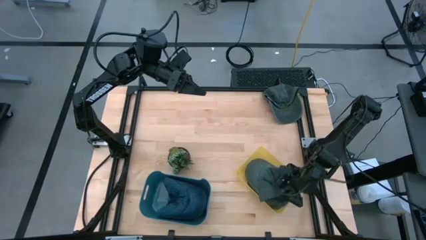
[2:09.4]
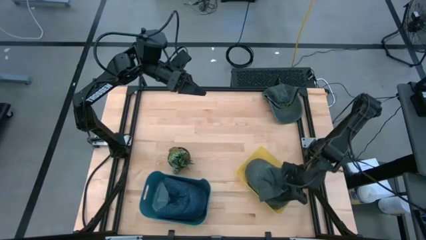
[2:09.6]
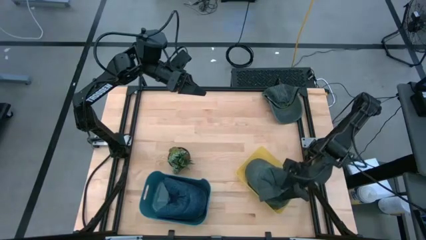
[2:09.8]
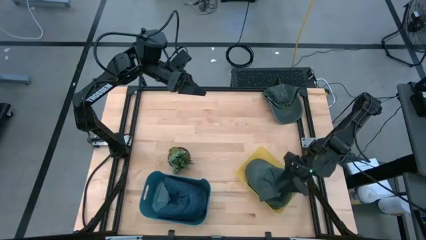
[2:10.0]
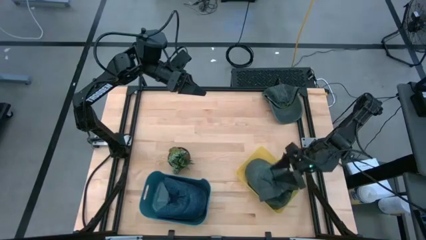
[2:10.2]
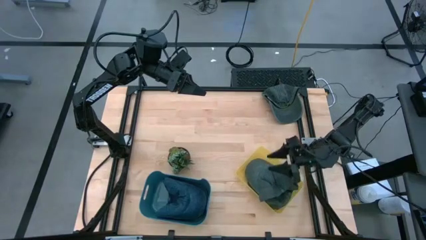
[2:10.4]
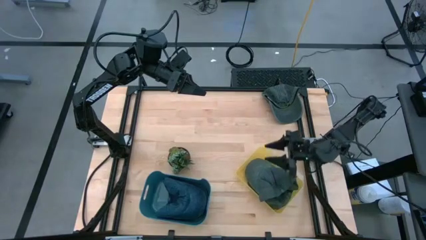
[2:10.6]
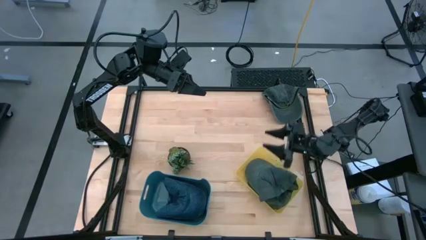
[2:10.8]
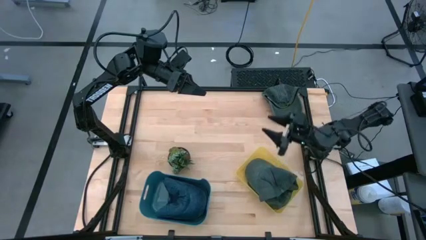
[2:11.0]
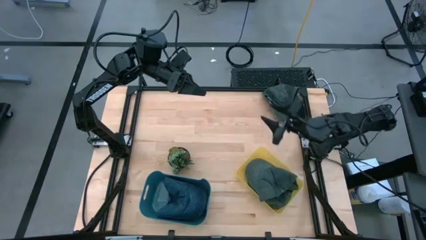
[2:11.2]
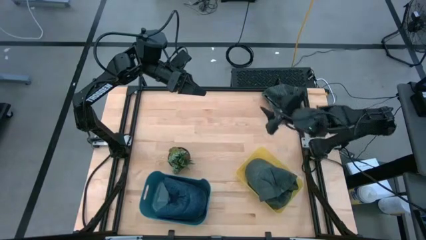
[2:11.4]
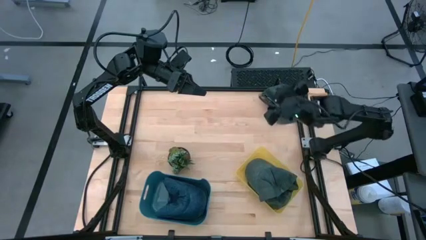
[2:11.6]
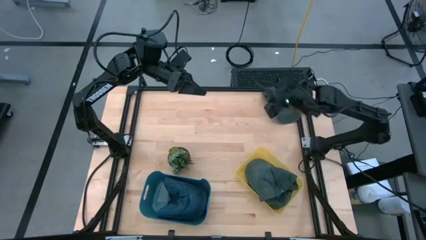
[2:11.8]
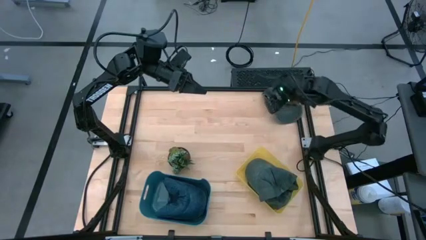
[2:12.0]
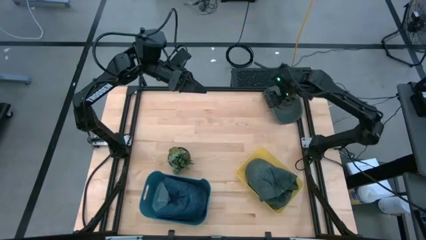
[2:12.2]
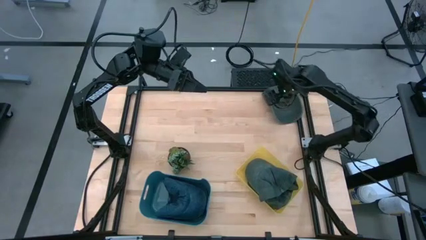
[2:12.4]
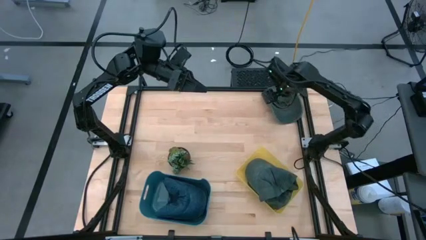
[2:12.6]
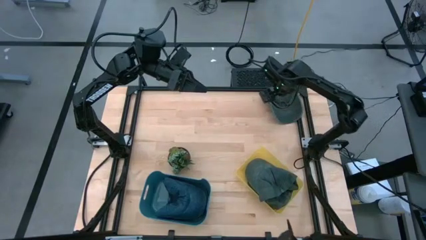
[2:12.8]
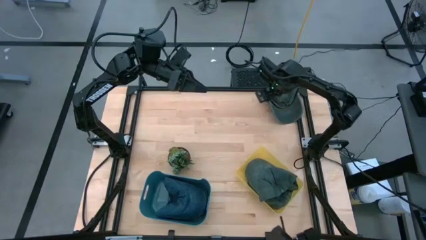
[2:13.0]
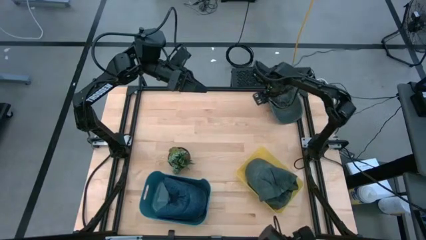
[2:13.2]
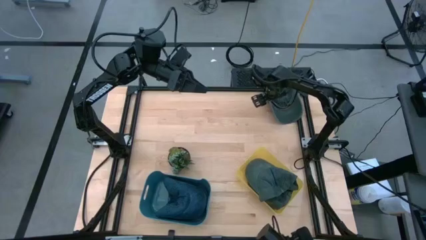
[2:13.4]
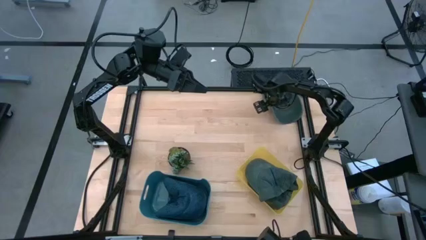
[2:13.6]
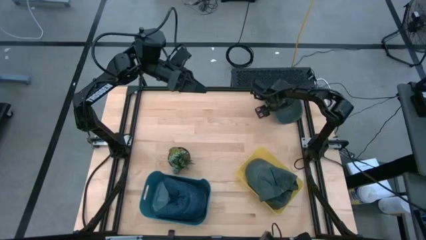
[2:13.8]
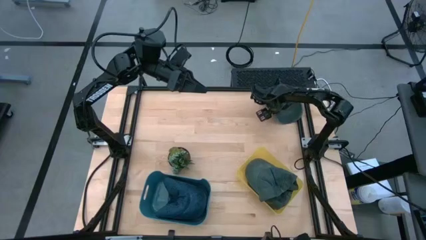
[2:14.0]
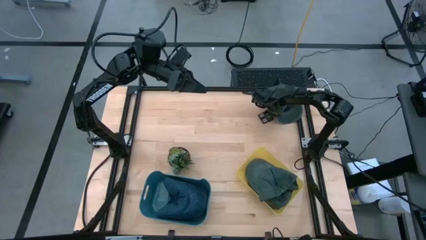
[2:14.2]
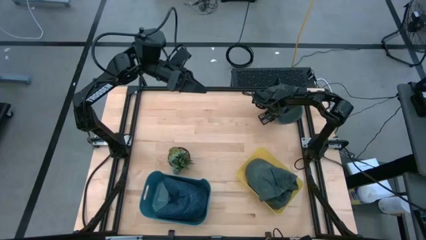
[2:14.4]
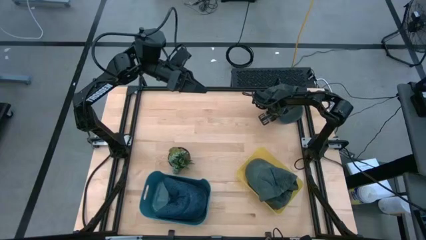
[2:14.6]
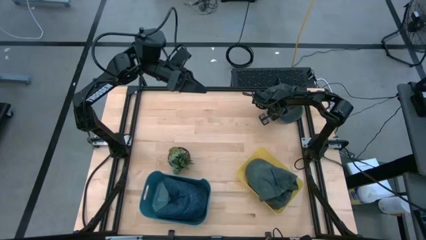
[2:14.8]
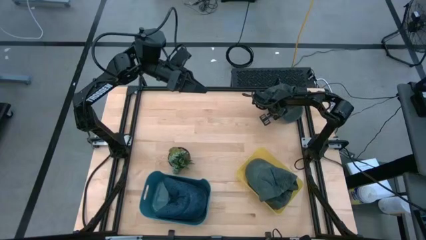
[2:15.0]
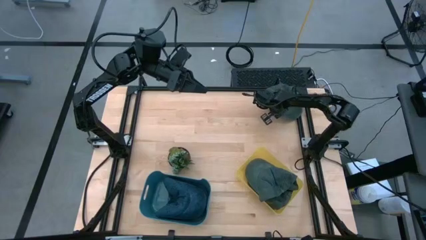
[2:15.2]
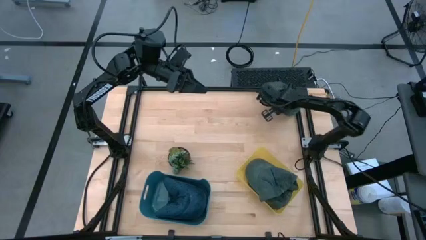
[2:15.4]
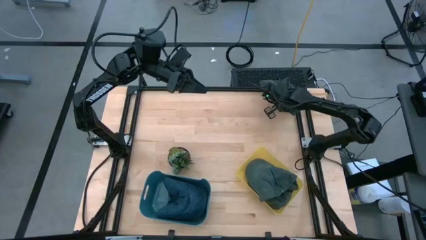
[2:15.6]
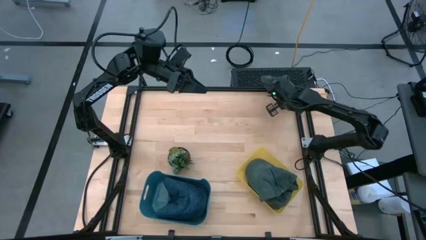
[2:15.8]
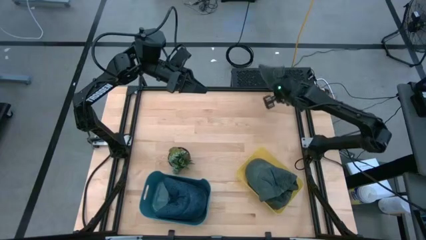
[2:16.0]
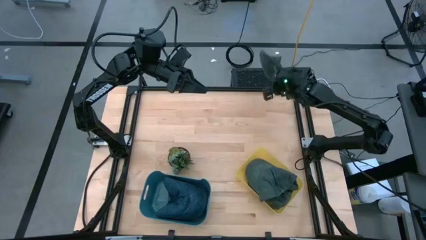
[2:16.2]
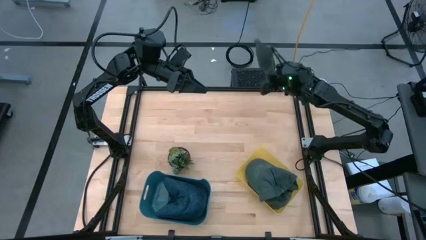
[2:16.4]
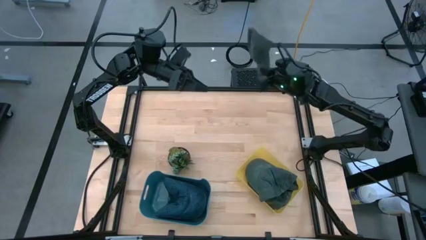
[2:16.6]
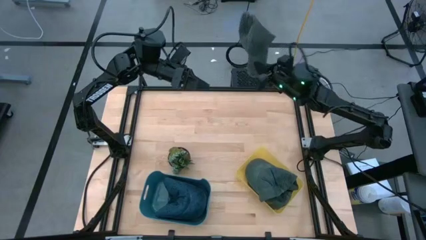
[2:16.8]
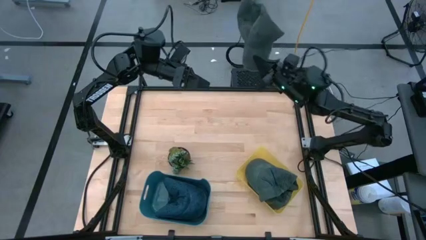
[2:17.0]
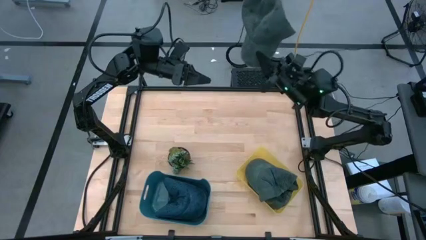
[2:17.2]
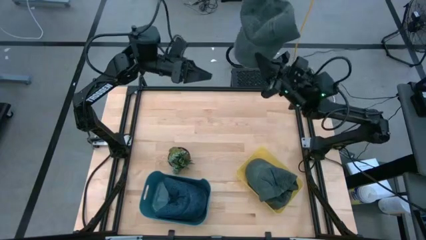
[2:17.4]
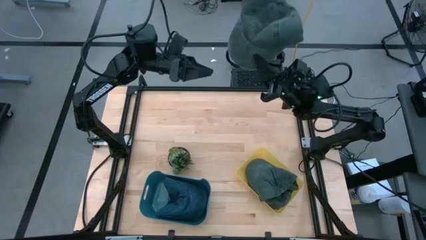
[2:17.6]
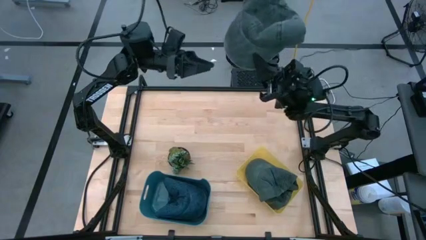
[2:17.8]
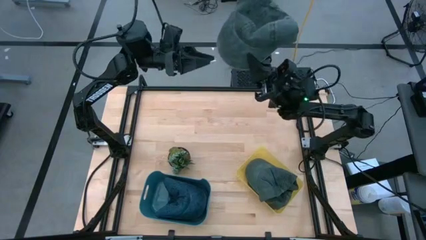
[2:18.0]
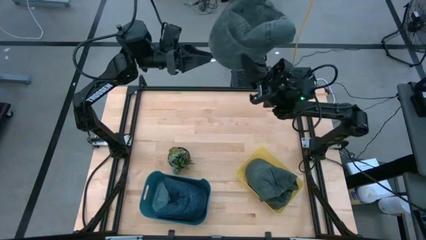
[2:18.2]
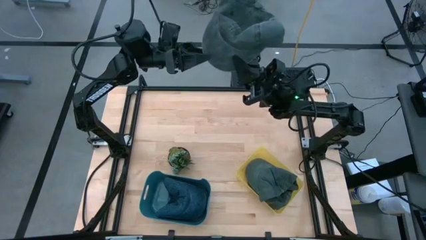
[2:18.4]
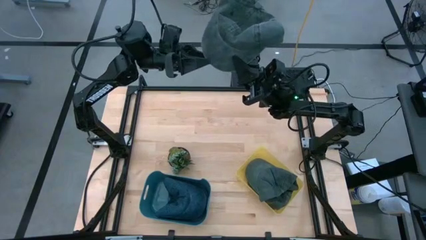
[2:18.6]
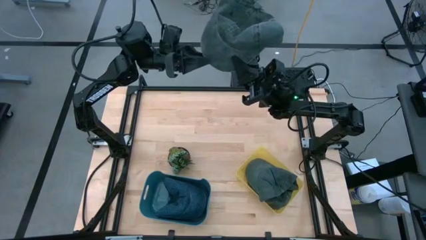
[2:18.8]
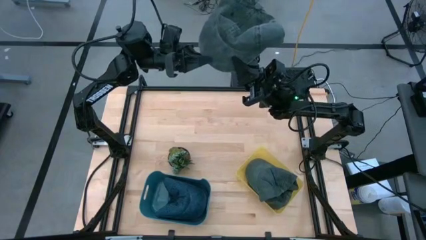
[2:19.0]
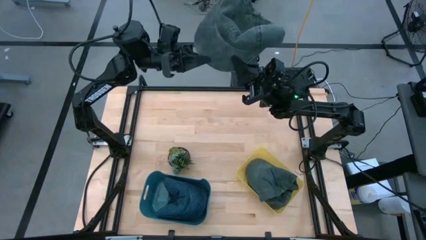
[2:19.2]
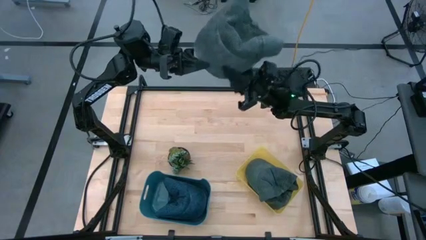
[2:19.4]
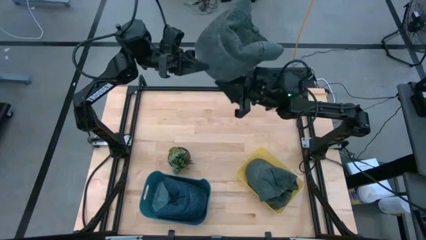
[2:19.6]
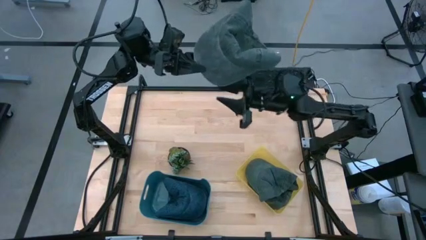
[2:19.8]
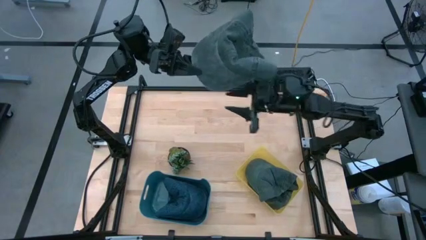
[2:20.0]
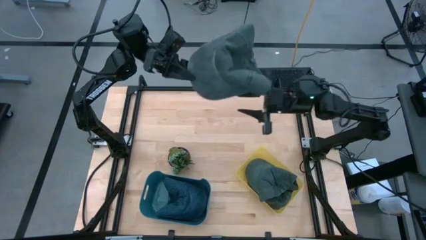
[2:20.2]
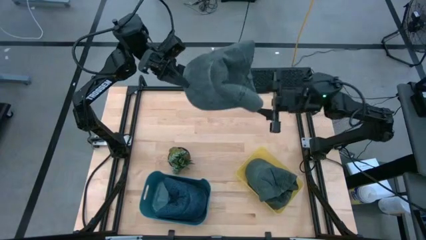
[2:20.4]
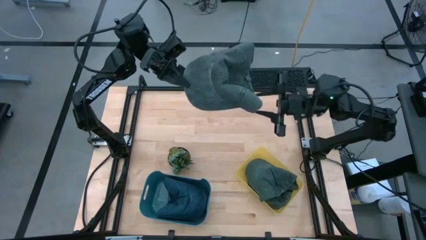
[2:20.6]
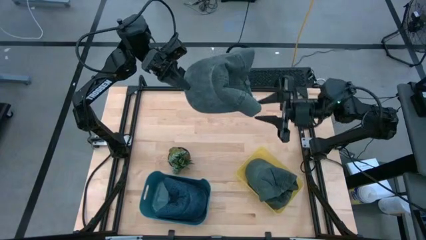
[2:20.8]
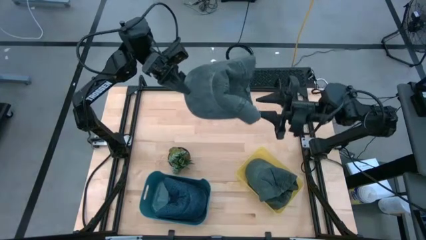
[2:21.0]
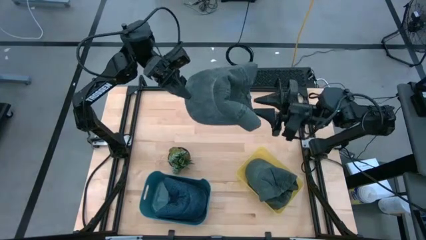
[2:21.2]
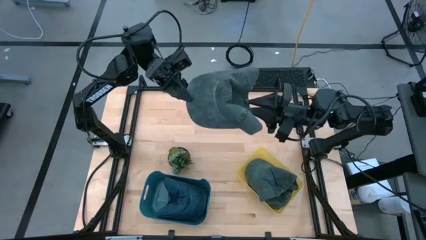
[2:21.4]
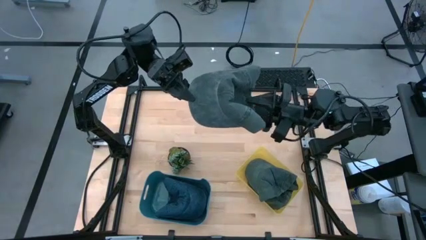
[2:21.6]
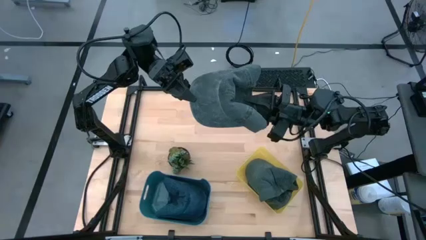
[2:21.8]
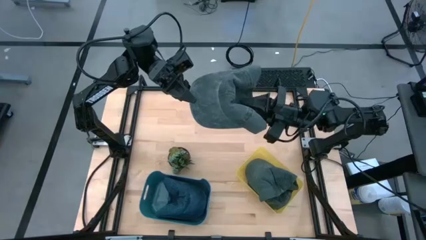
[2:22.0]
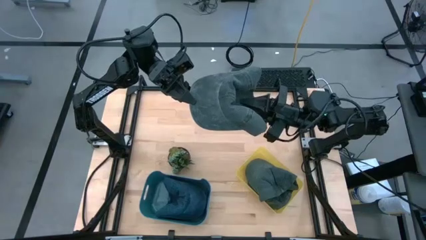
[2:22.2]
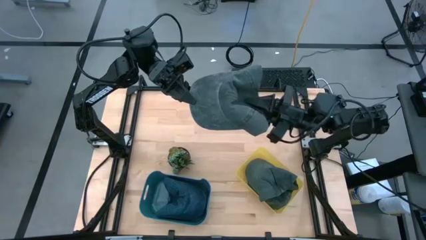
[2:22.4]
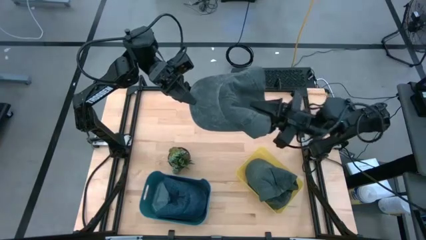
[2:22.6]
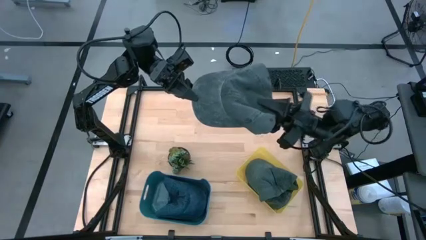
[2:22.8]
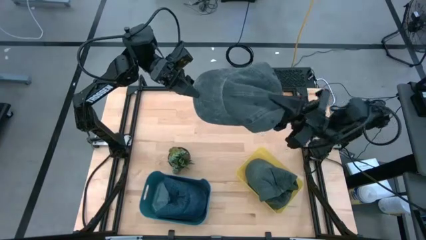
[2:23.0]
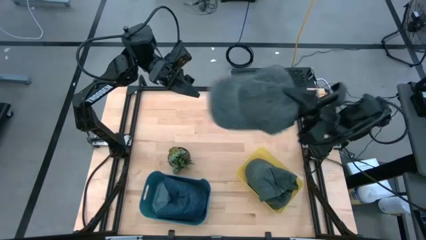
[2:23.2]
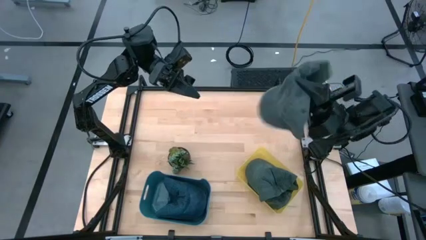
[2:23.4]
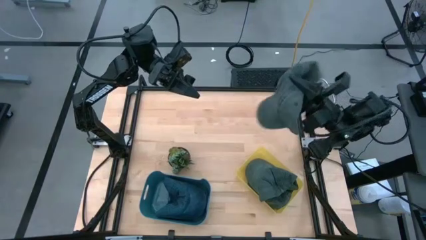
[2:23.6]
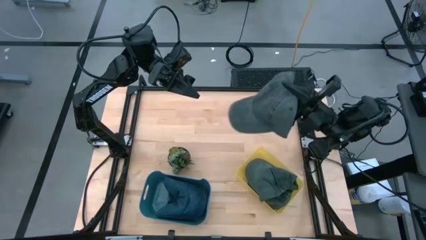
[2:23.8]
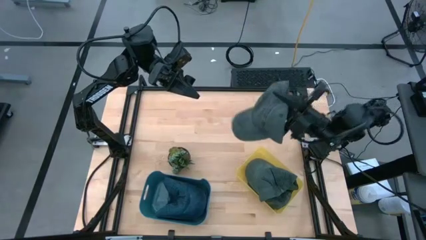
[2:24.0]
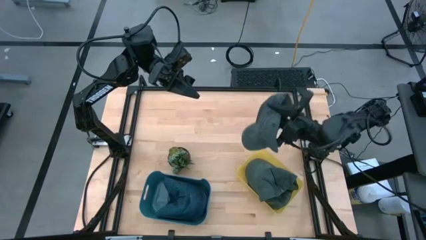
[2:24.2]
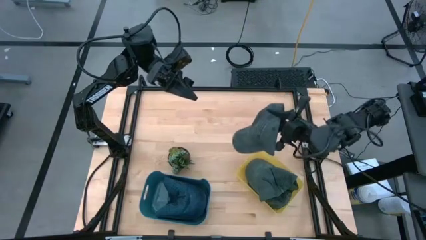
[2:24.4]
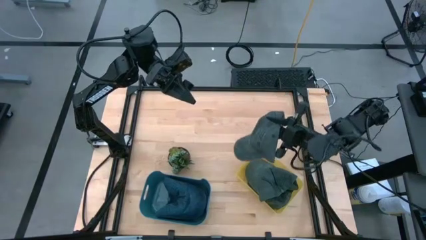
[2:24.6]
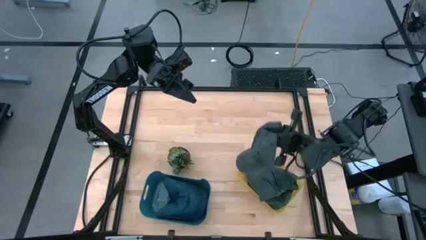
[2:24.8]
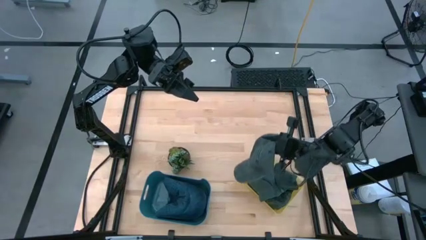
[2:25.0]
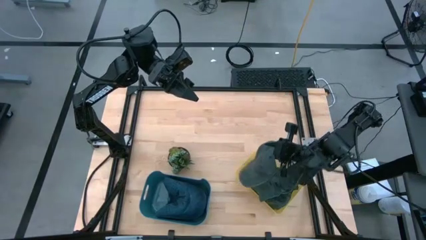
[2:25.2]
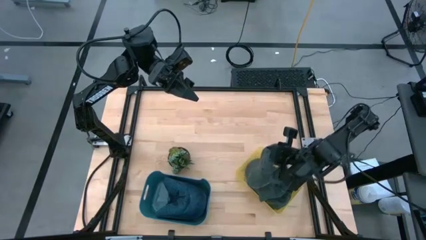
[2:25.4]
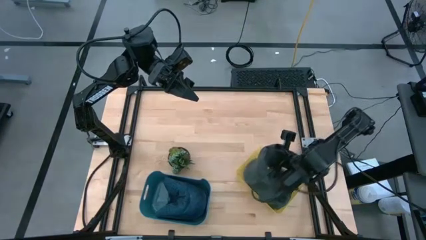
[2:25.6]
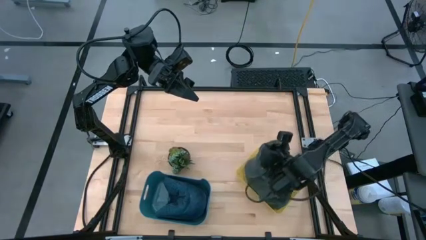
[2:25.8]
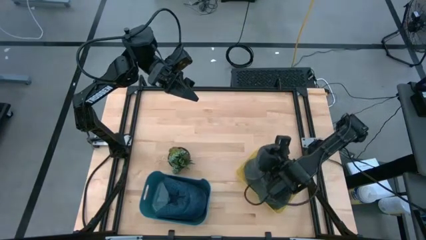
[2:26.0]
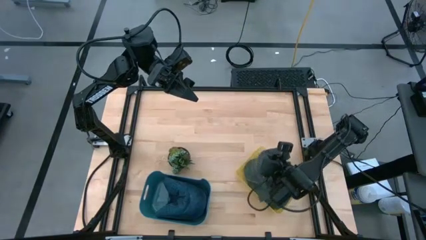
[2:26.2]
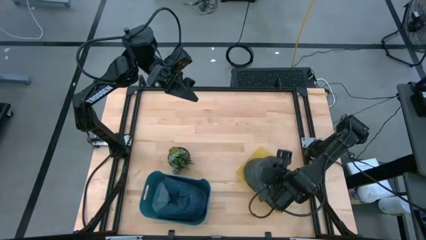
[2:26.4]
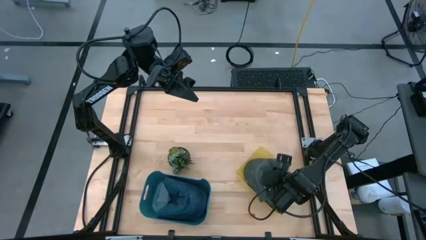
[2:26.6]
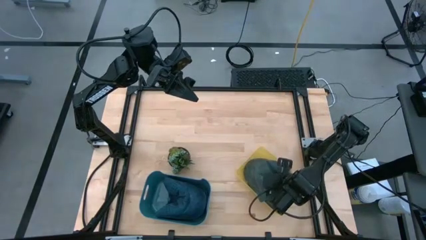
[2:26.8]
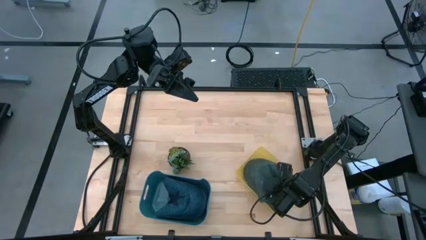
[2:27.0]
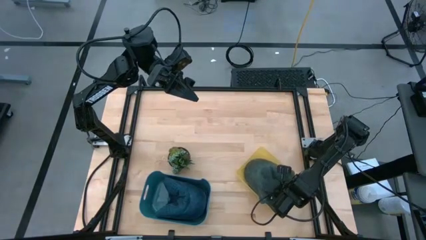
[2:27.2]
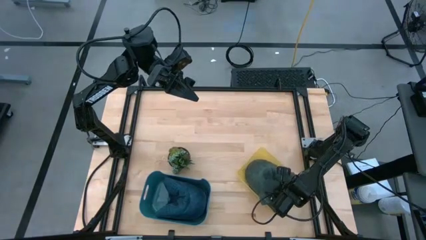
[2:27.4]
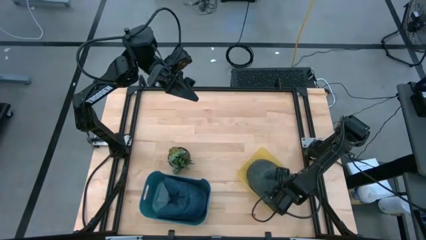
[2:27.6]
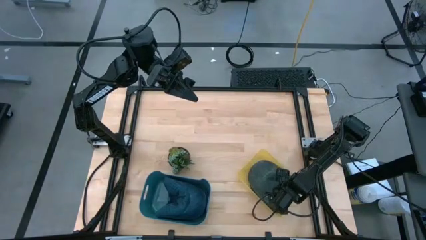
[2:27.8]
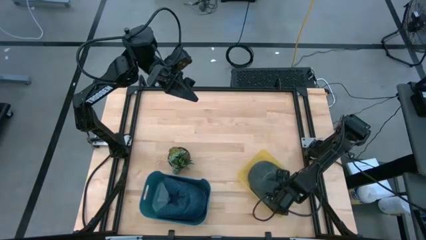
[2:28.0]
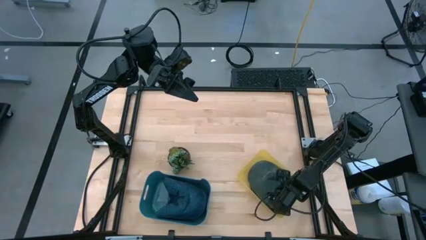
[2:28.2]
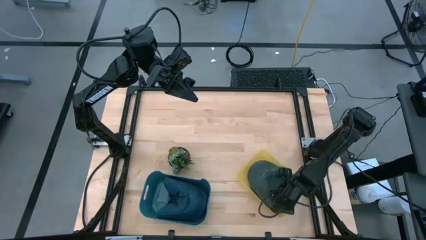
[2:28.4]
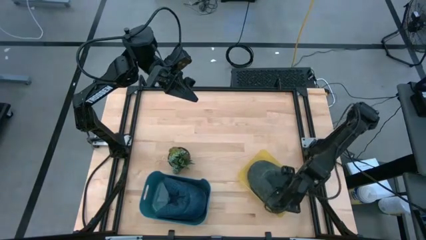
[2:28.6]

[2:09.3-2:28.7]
Task: Pick & Place hat
Put the black cap into the yellow bin
